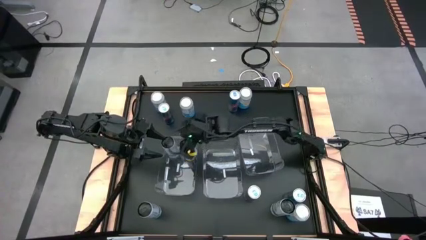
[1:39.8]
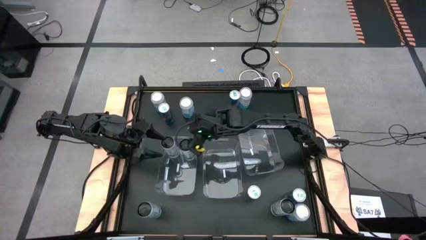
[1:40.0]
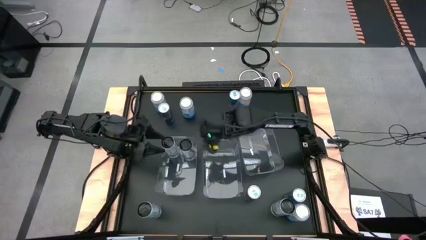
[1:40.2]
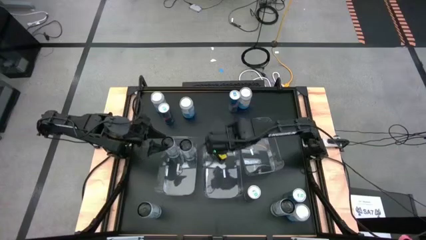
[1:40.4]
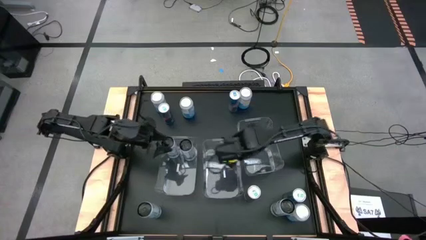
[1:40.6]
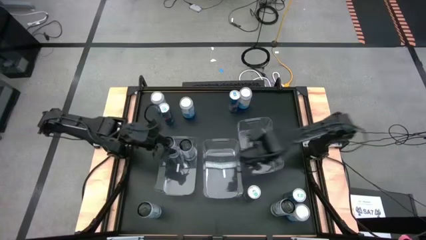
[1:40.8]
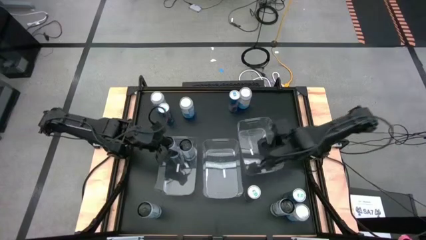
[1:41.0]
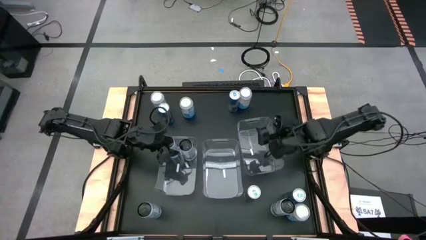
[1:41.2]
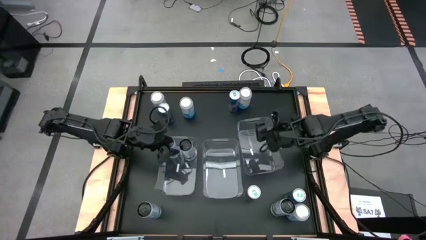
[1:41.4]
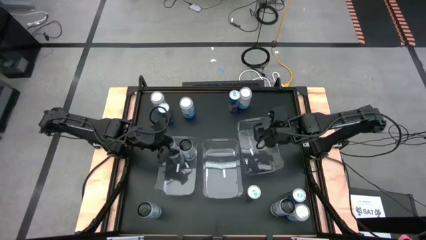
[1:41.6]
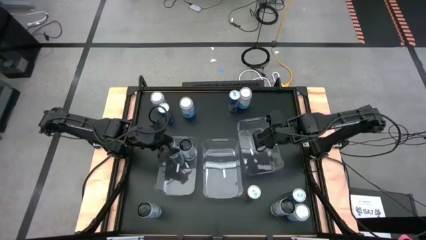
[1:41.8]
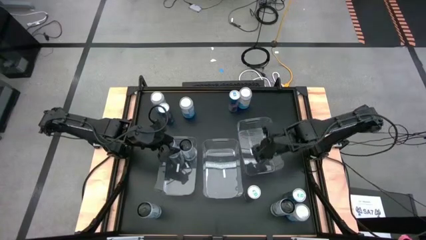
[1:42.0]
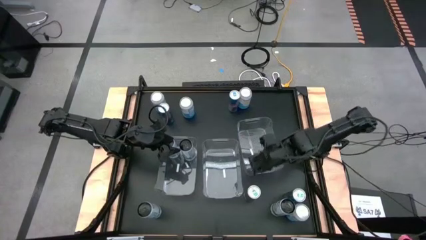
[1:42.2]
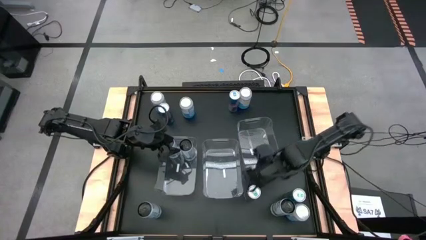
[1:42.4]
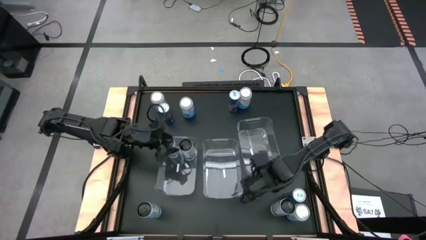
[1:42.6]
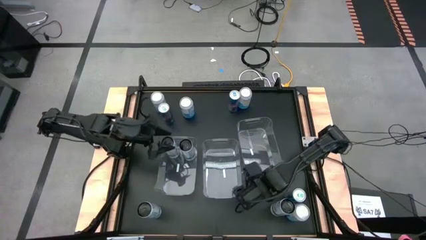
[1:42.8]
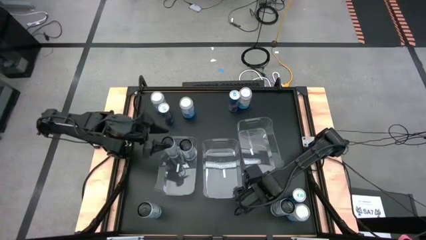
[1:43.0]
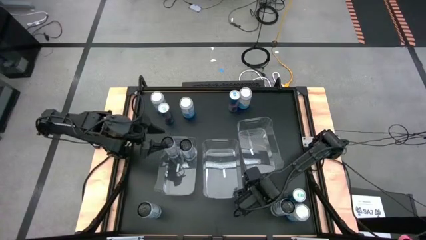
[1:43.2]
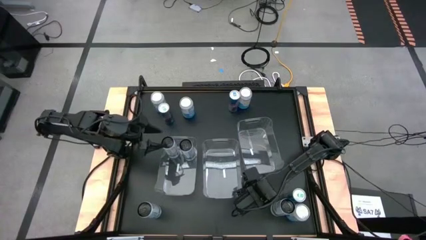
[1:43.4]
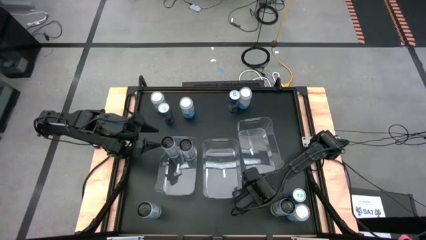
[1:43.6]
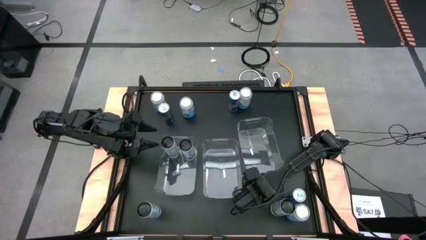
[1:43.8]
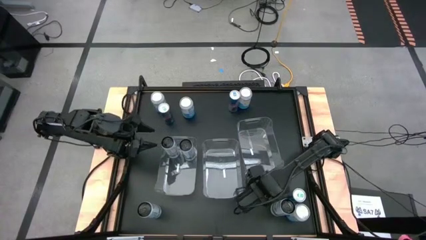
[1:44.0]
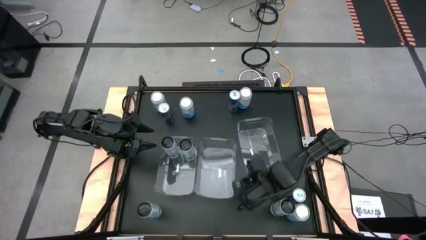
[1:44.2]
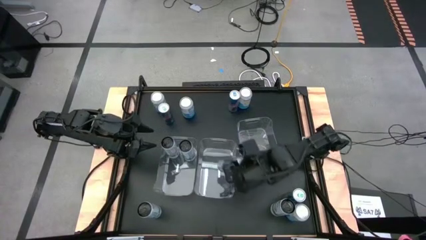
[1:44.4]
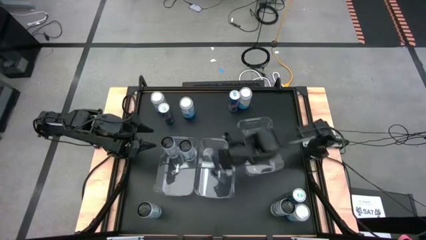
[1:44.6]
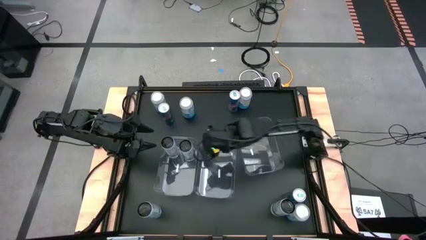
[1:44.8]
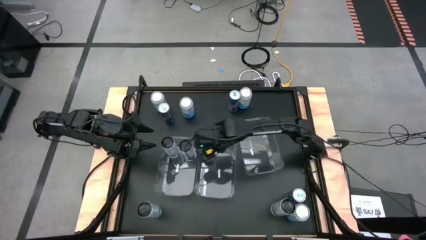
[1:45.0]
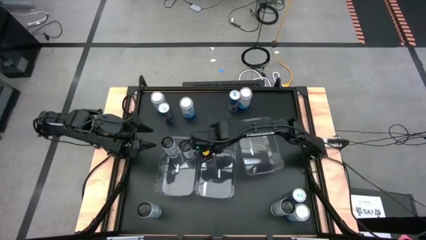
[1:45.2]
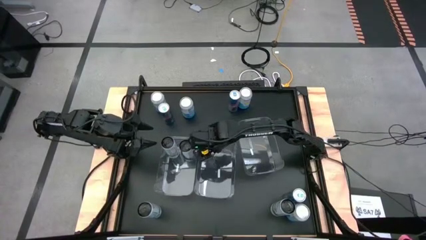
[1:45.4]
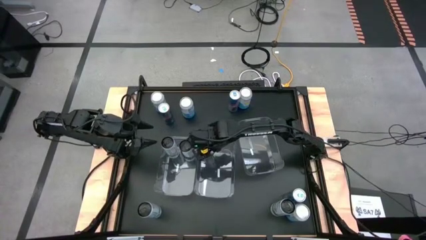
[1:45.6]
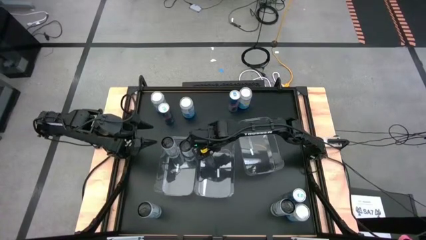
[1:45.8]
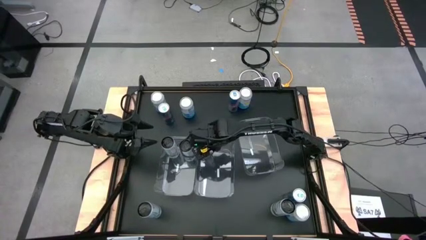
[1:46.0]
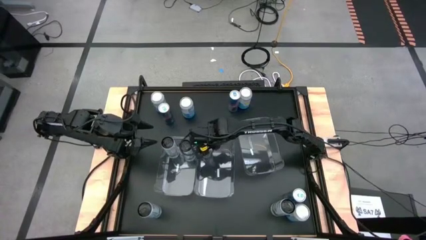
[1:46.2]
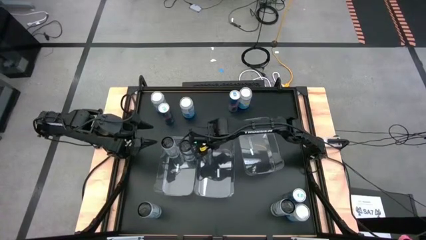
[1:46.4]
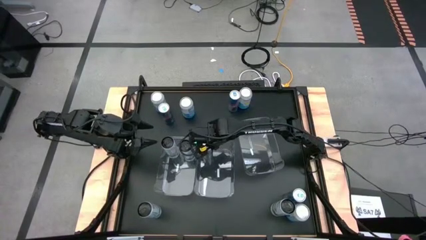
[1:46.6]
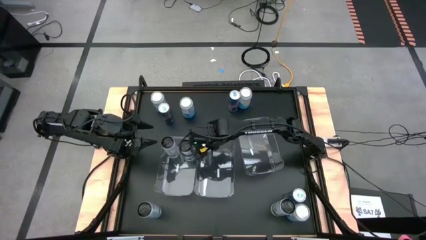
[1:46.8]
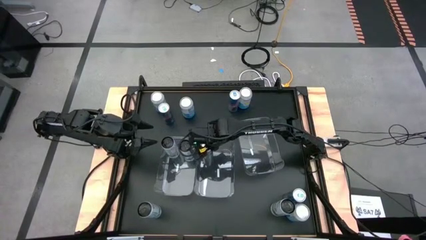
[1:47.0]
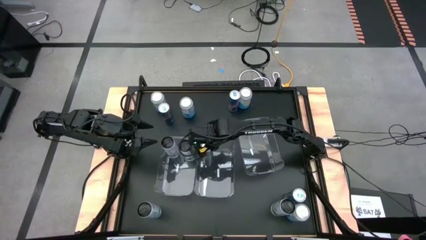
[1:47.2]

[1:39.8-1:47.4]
Task: Sort soda cans
Put the bottom right blue soda can into the middle transparent bin

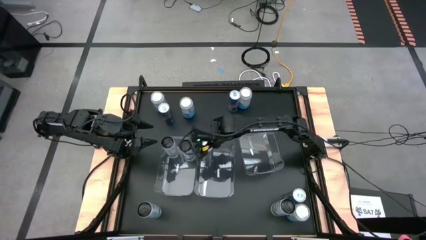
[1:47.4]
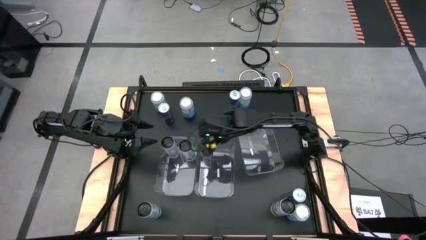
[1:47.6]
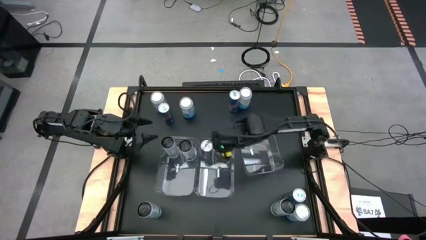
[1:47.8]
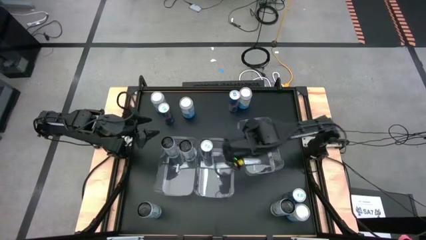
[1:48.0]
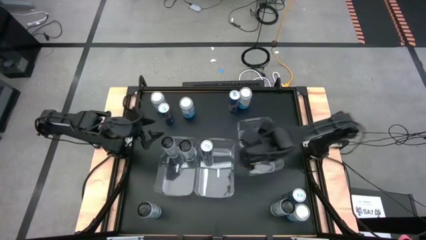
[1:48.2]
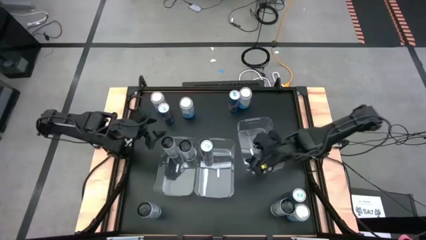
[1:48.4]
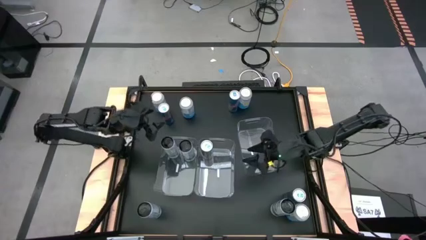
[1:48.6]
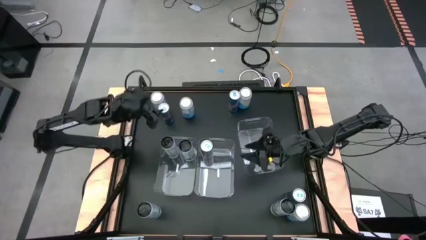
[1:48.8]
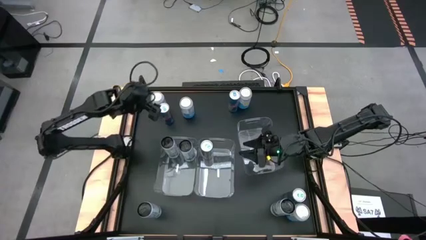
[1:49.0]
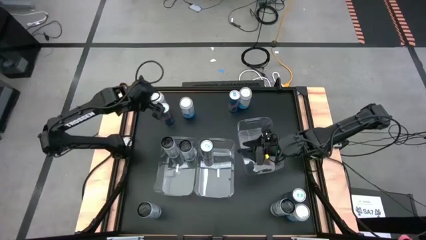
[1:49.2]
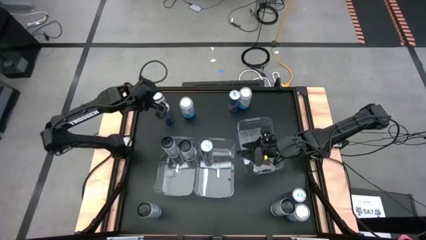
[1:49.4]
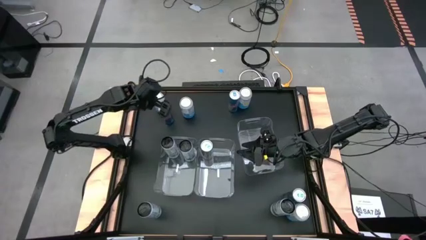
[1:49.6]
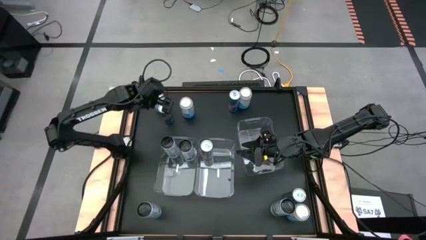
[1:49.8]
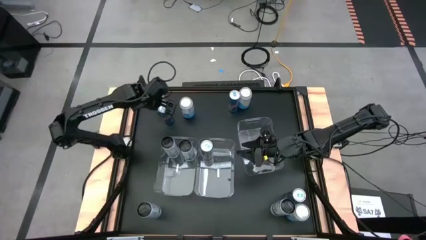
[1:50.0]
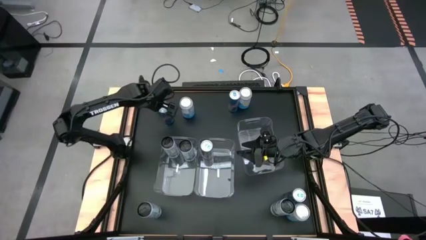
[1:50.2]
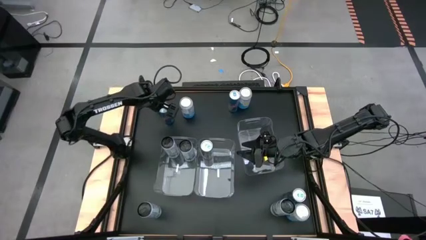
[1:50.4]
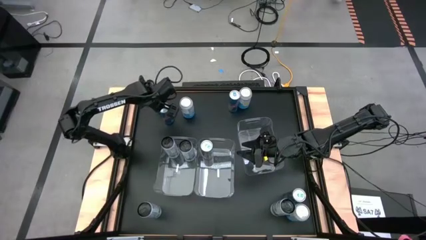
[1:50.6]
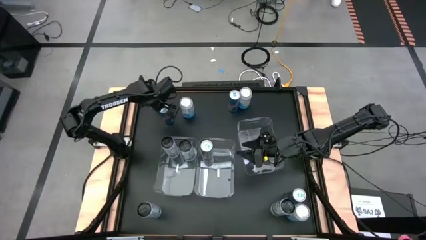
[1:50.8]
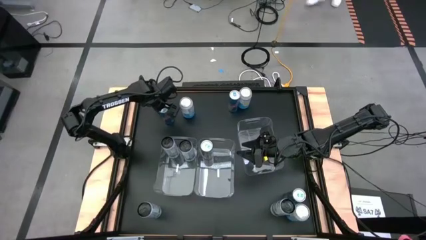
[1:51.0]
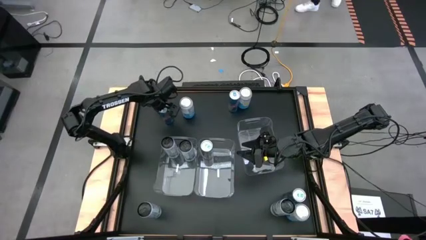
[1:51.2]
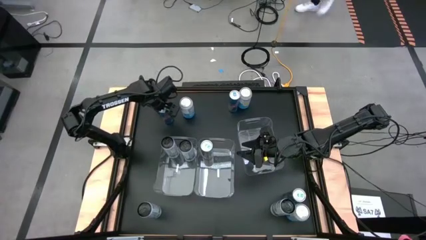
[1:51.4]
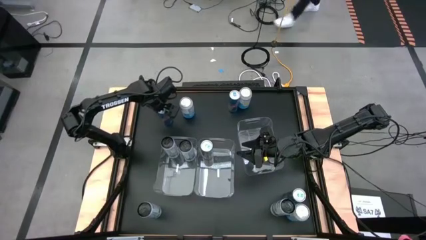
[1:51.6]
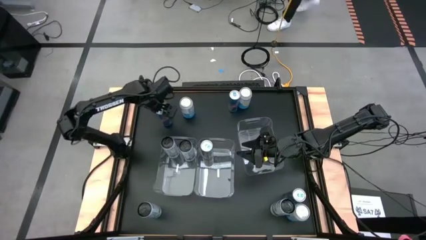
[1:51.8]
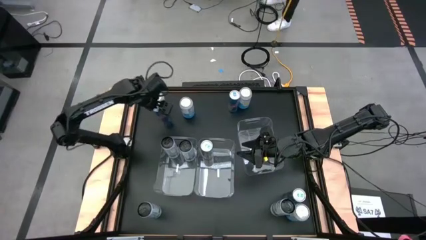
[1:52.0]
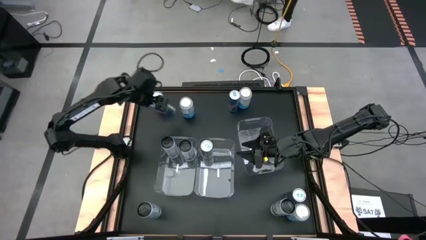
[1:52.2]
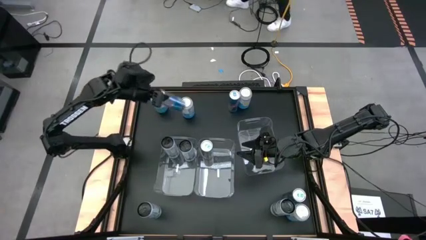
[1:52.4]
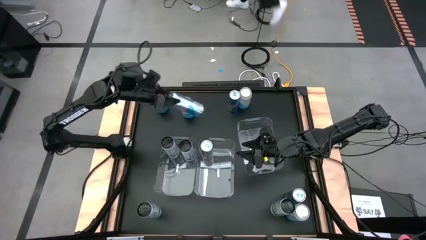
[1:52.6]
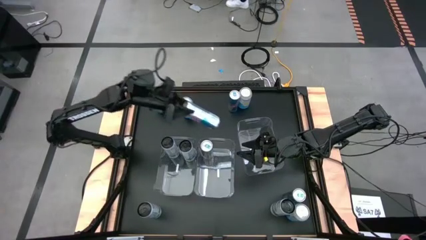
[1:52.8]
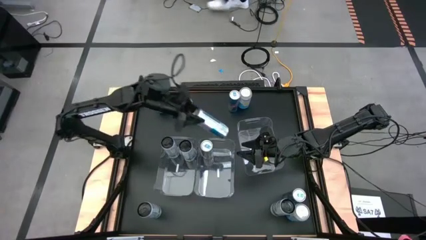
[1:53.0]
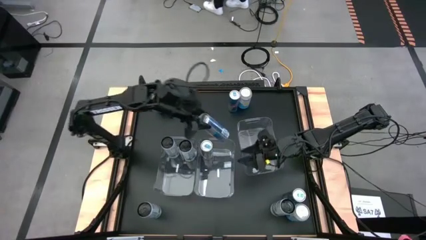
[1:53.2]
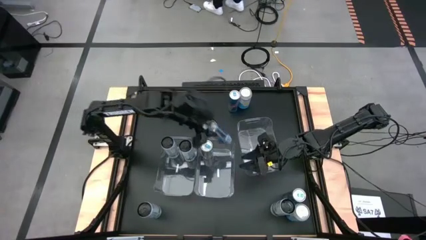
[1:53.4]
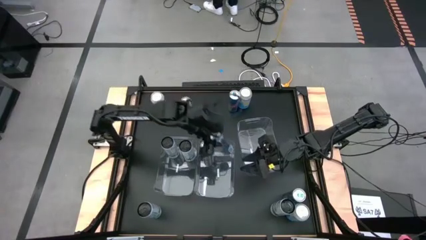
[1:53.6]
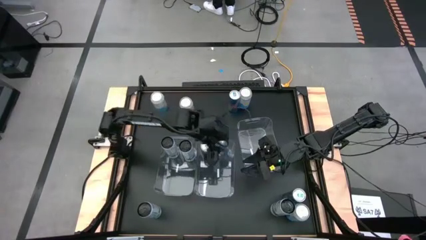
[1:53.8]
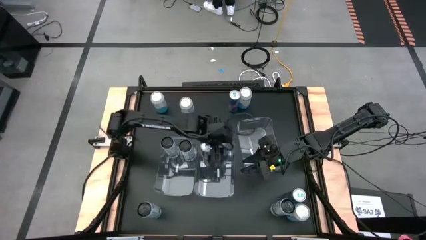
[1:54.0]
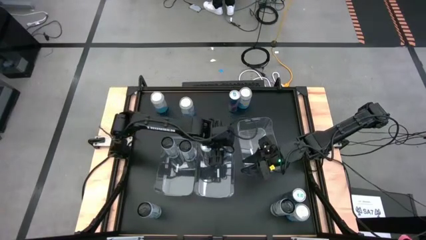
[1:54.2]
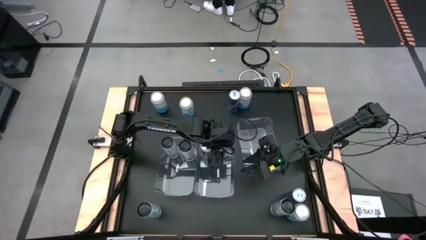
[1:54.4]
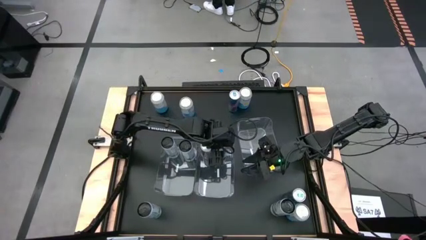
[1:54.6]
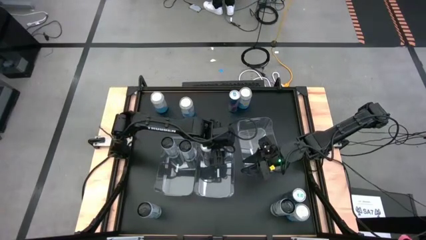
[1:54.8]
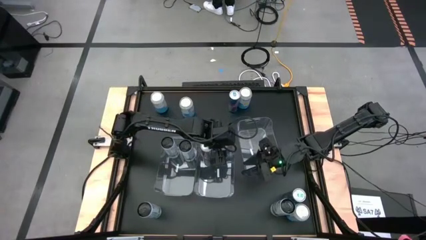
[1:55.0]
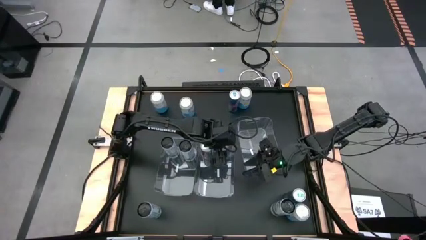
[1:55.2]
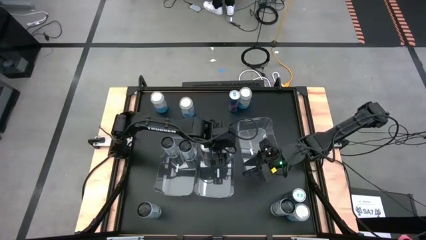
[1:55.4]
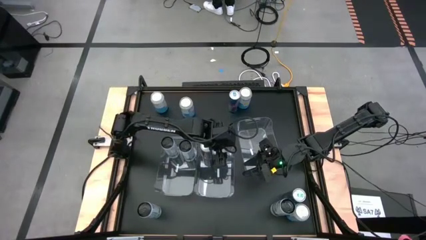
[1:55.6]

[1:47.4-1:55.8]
Put the left blue soda can into the middle transparent bin

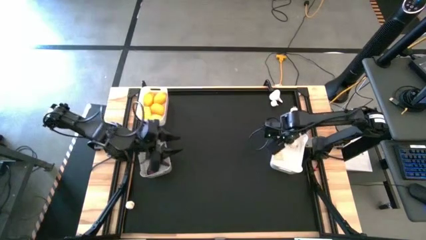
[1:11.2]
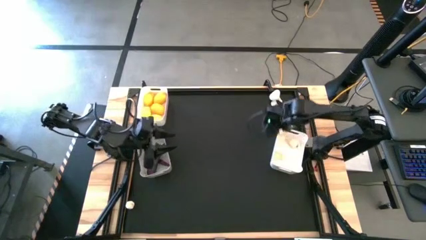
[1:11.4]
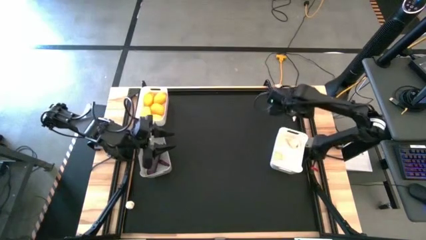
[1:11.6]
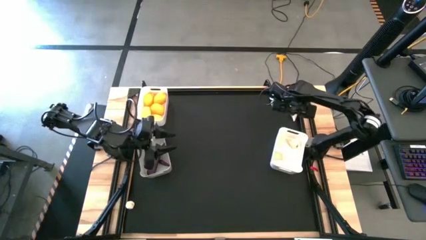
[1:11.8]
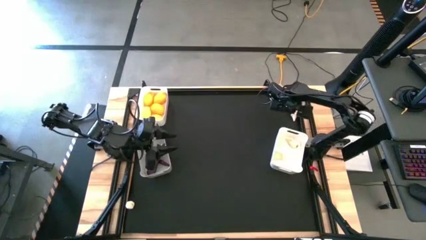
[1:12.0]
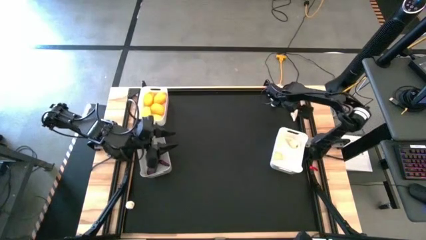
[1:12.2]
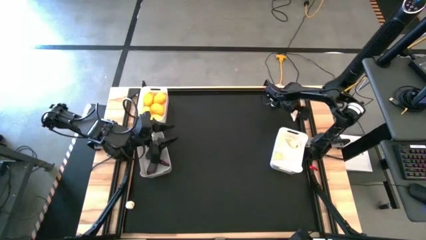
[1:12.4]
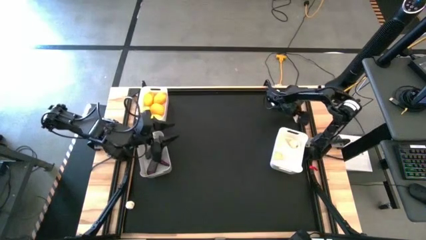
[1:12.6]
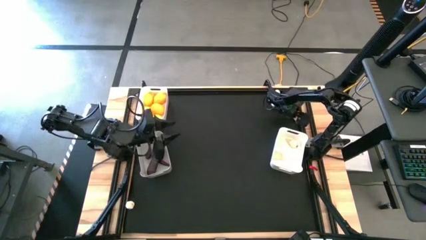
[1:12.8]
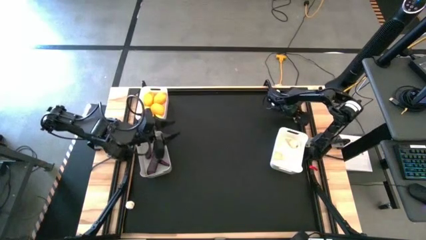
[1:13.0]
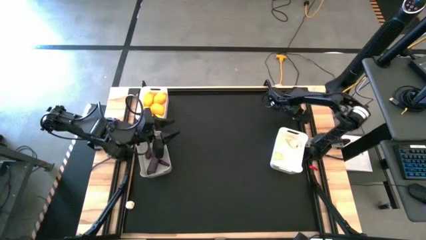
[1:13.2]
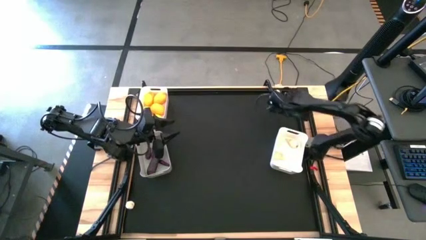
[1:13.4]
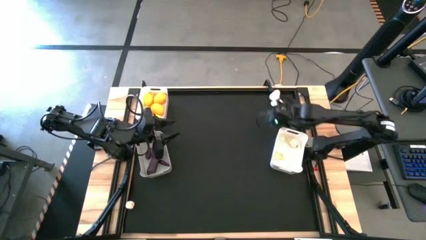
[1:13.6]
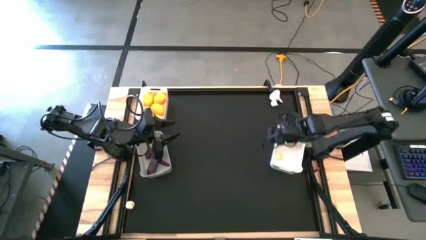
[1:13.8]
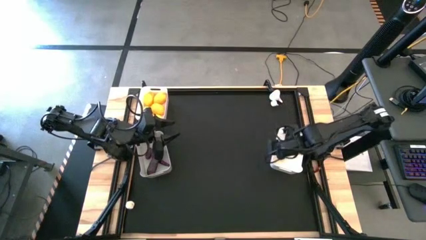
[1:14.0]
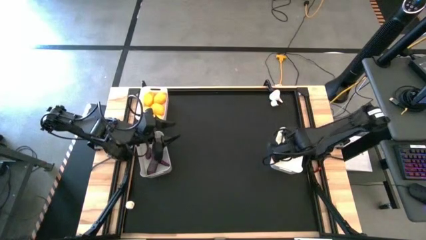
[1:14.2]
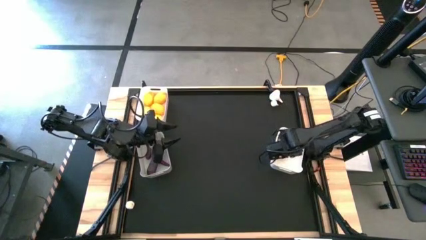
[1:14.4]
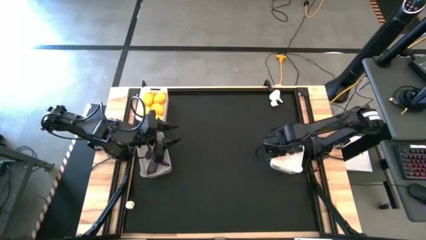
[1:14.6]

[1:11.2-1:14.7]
Task: Sort produce into baskets
Put the white garlic into the bottom white bin
